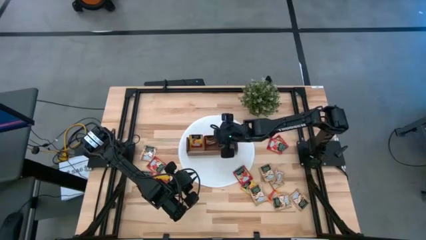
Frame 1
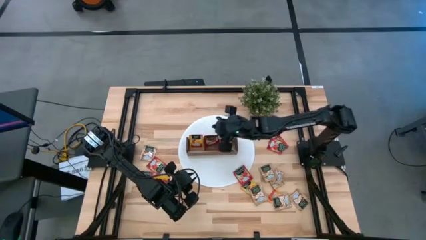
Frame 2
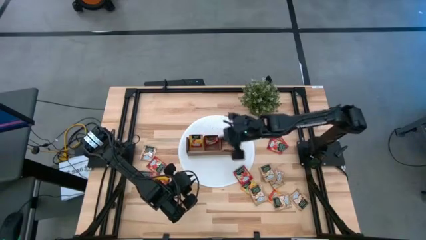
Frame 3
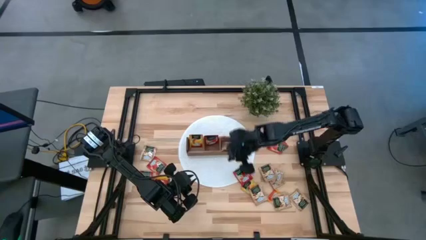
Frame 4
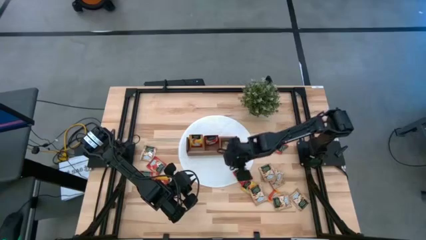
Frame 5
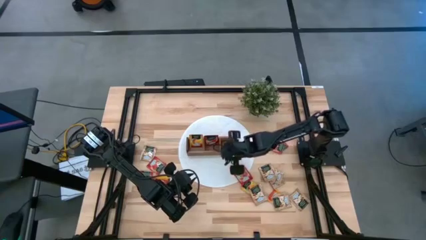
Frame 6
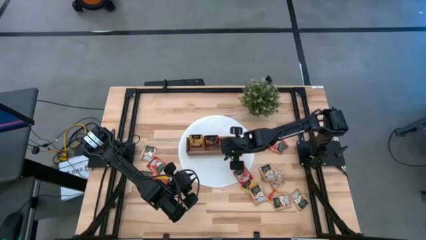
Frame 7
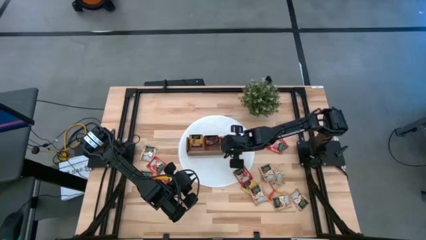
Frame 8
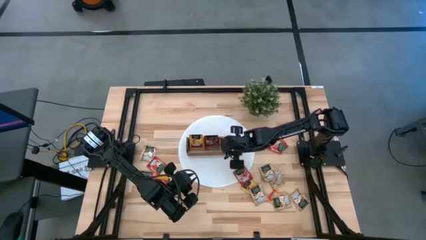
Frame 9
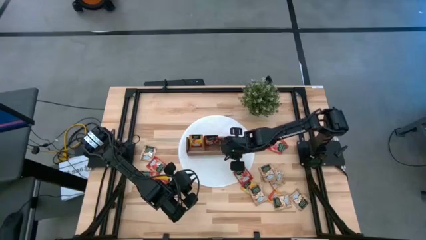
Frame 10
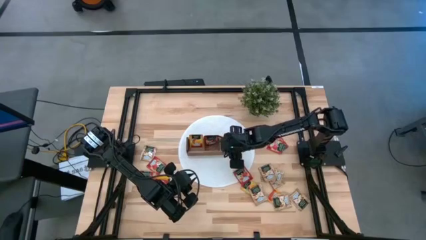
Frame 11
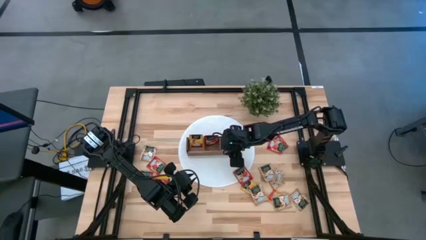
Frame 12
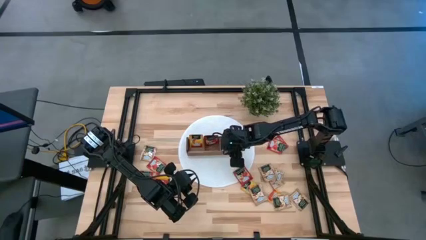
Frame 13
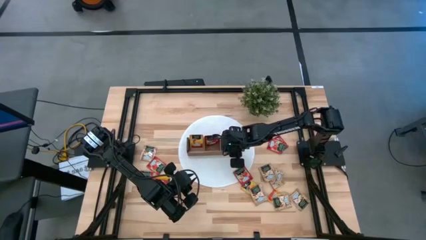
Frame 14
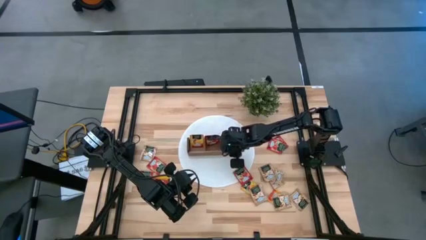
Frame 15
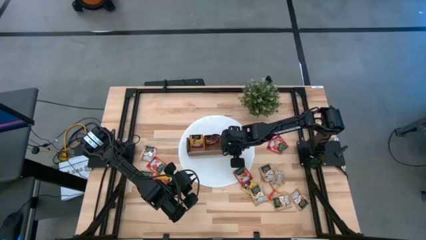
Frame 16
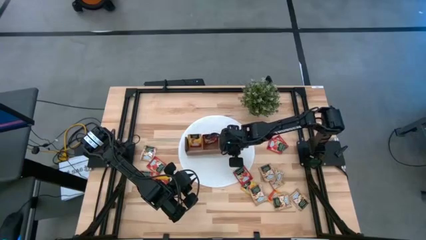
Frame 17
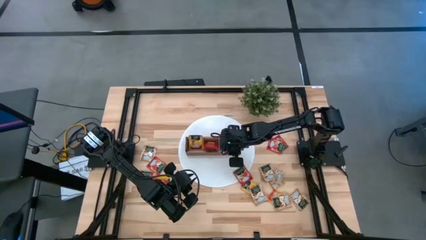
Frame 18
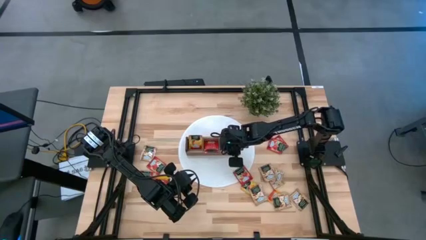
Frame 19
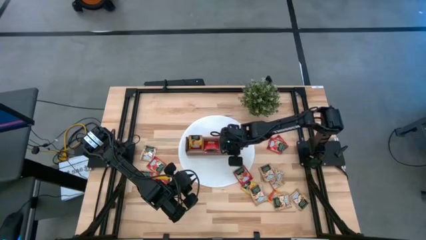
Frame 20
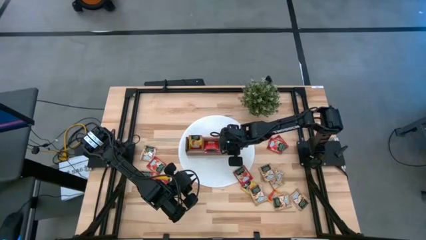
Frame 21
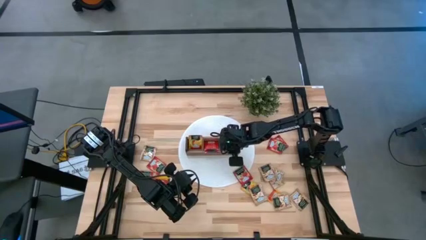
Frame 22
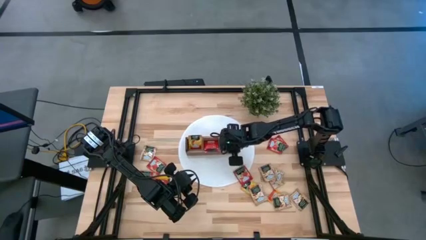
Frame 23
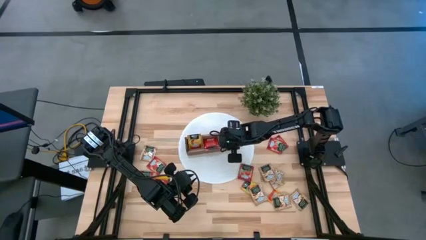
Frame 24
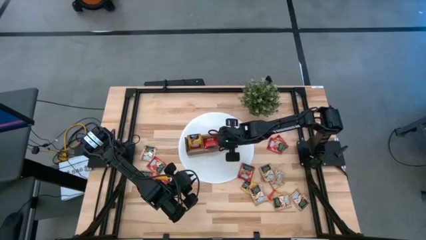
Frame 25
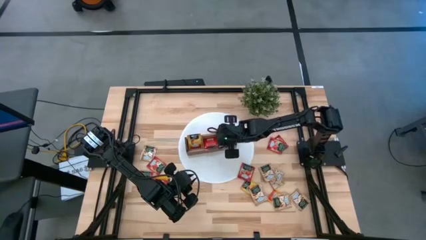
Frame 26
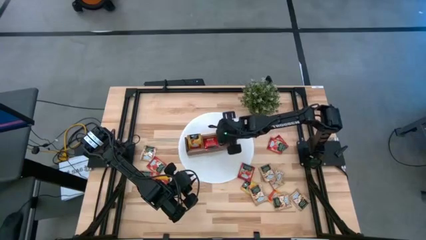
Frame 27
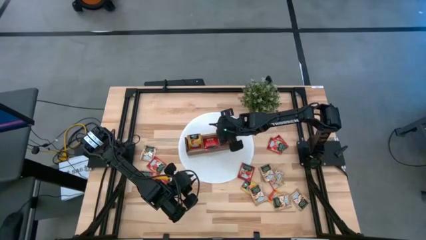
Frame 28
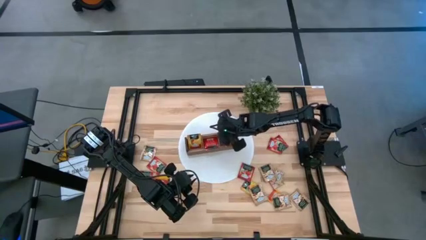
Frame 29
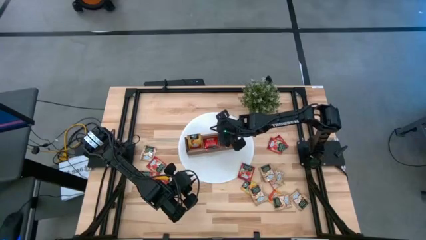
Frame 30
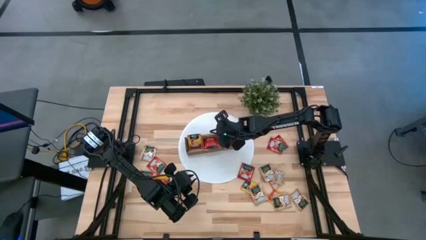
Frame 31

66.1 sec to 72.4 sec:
Task: Pick & Place Tea
Adjust the brown tea bag in the right section of the wooden organizer

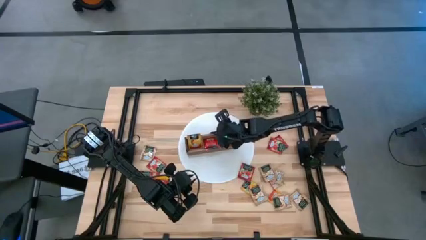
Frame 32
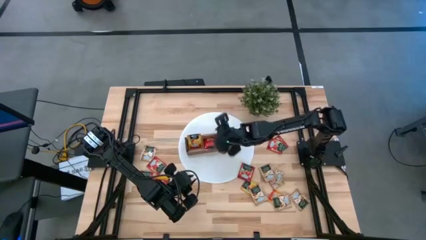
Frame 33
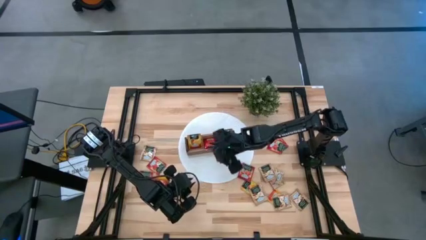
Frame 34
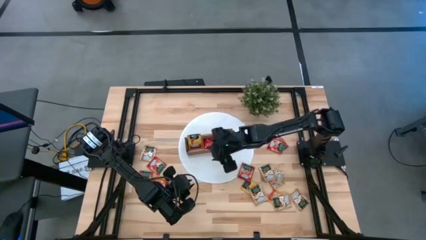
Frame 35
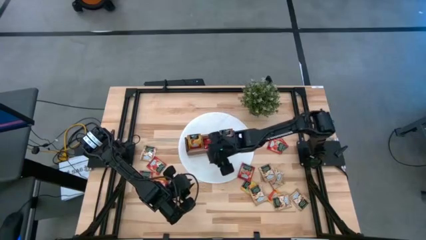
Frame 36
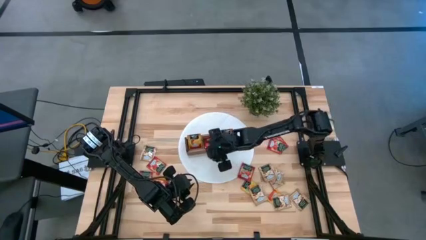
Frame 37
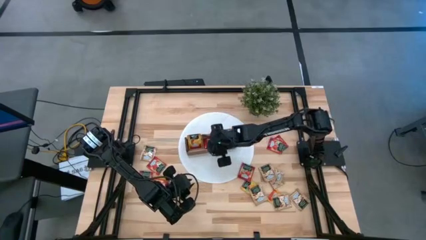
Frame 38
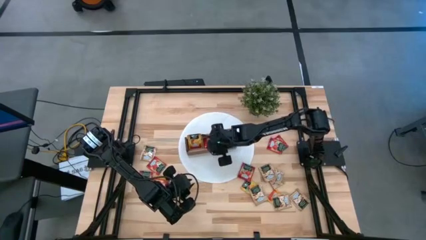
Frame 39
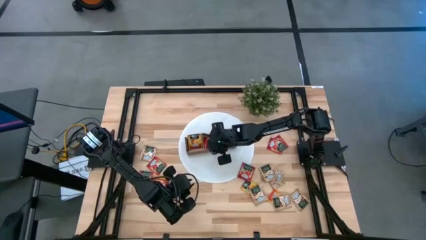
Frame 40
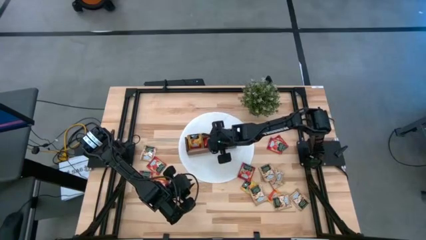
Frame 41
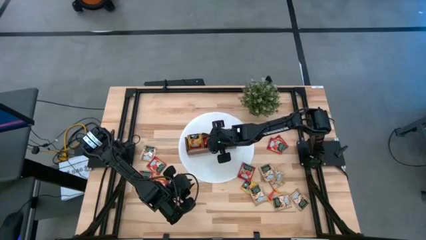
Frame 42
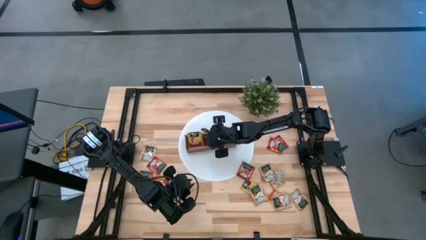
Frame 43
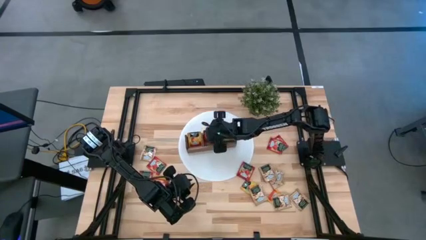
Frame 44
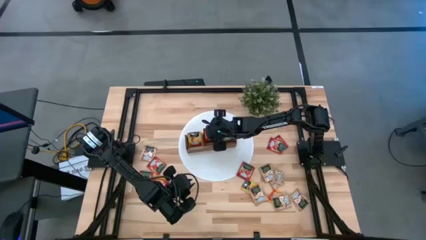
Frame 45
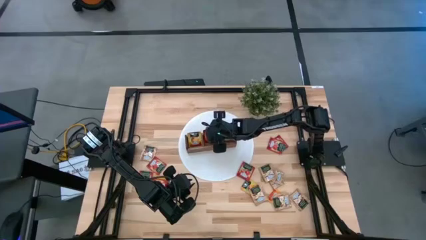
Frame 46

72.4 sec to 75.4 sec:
Adjust the red tea bags in the middle section of the wooden organizer

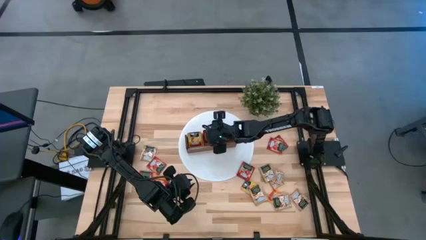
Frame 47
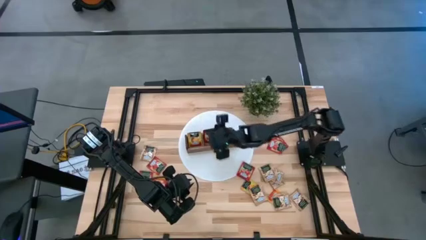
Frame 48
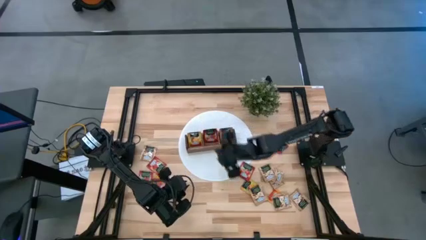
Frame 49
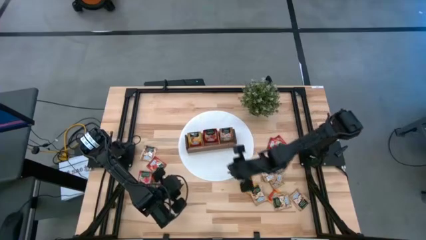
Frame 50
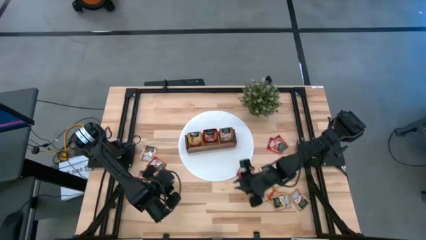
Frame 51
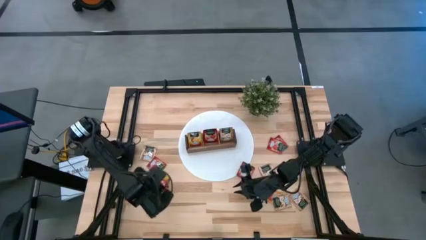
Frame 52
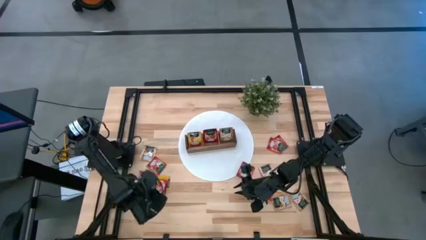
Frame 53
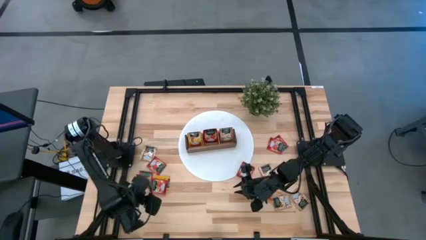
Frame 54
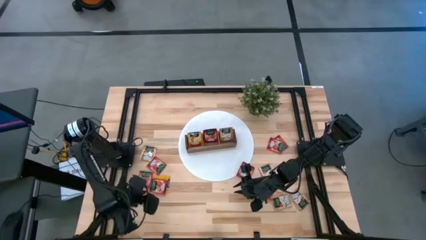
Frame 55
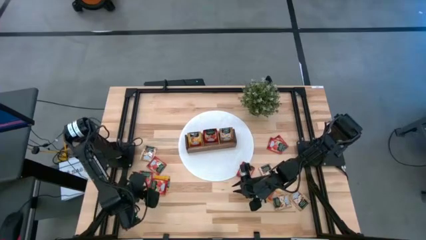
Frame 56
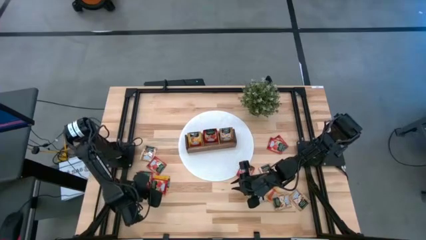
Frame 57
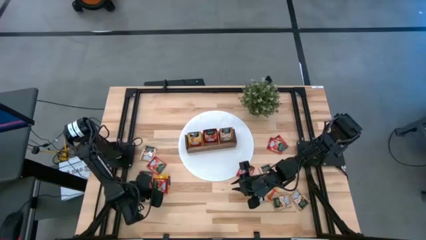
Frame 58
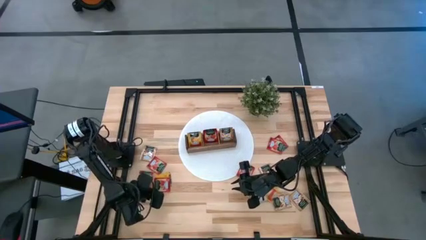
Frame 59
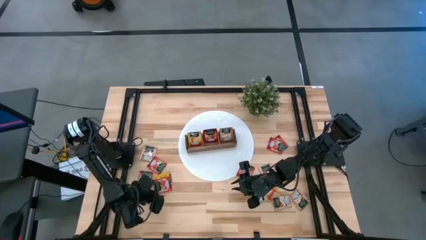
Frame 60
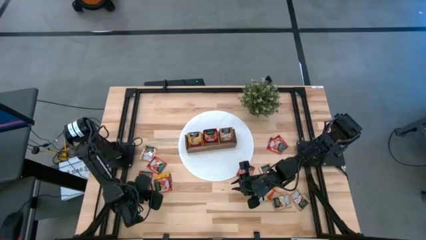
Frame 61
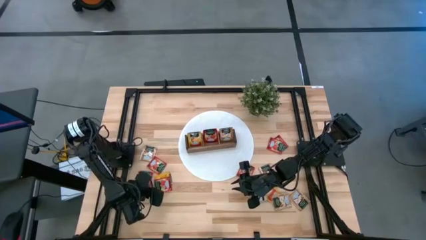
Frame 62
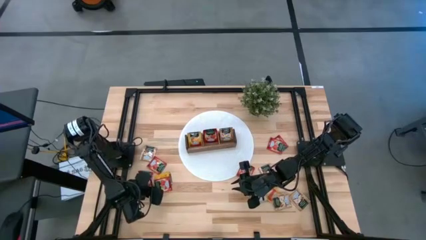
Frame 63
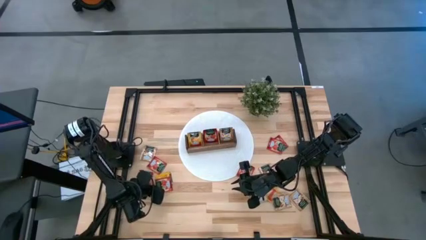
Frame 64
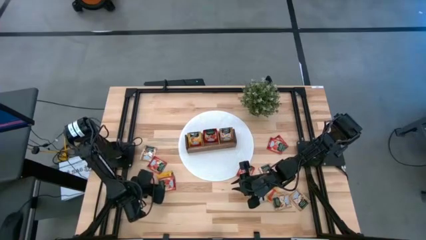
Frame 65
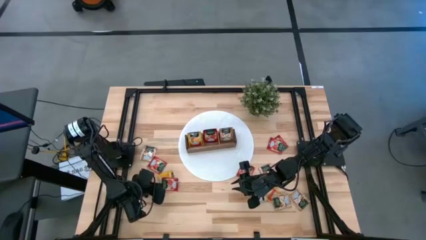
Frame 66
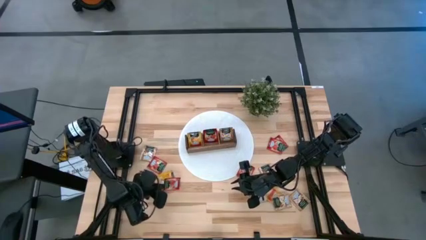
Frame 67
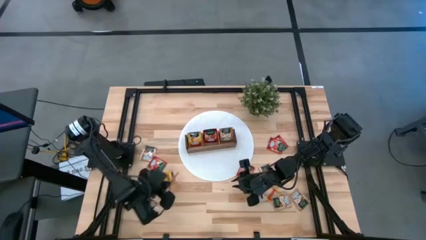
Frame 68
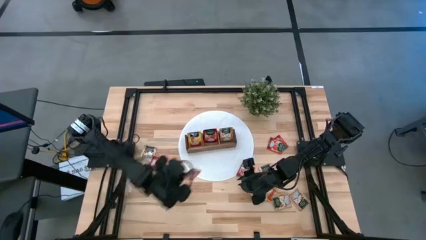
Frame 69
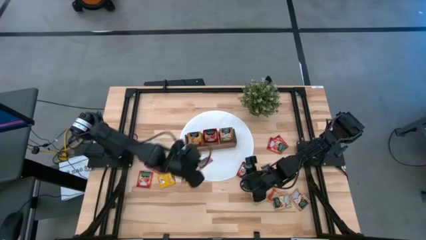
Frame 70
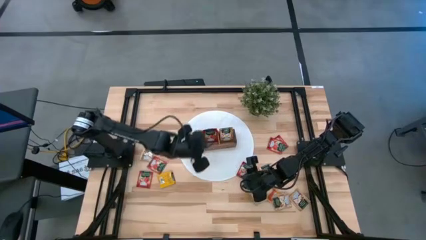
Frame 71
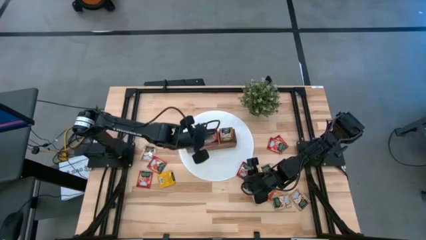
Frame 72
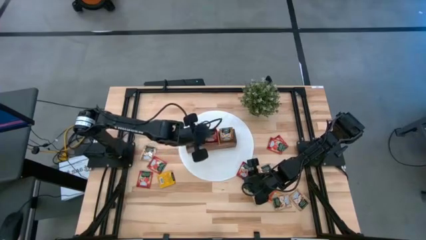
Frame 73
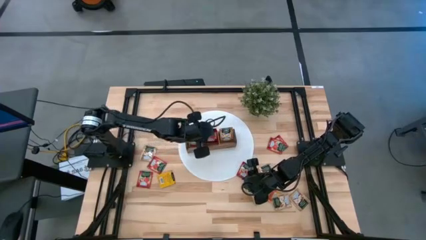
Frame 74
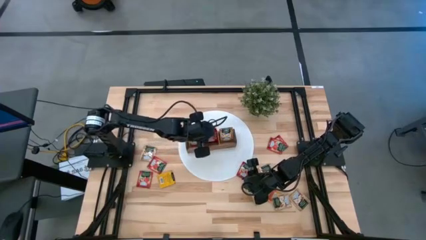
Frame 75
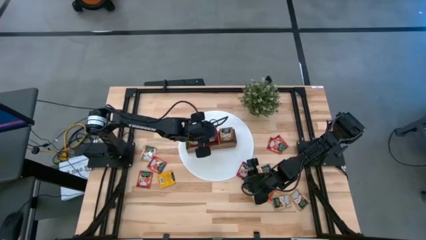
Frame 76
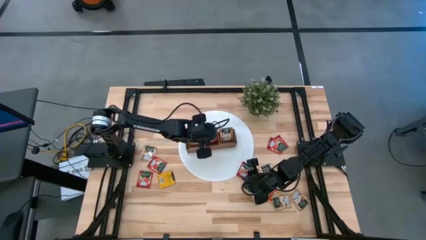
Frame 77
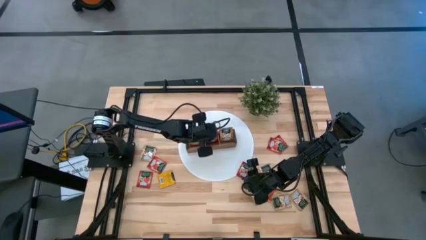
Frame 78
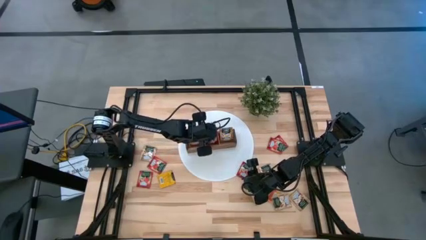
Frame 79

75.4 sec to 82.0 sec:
Put the red tea bag into the middle section of the wooden organizer

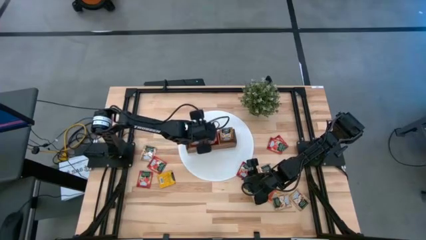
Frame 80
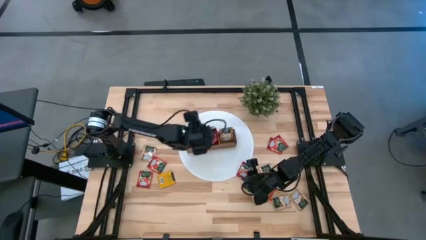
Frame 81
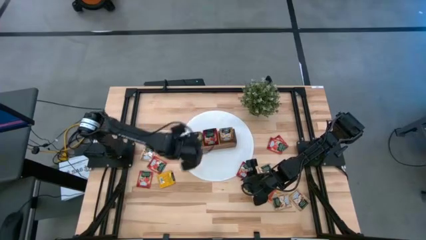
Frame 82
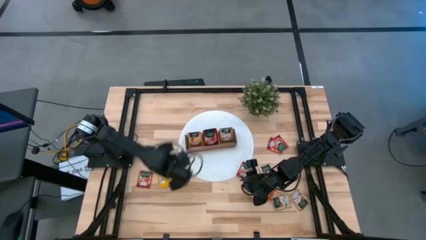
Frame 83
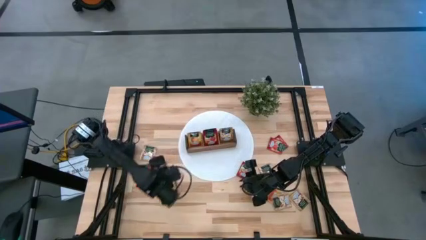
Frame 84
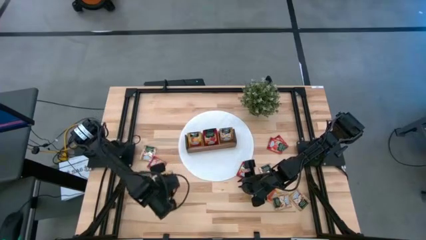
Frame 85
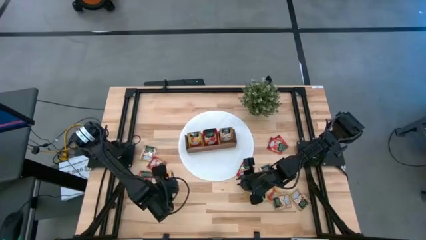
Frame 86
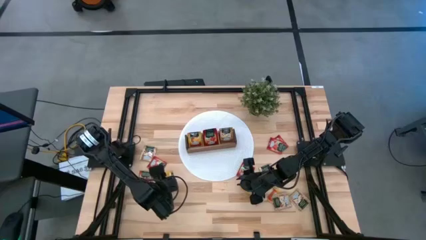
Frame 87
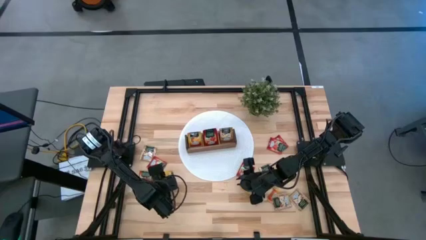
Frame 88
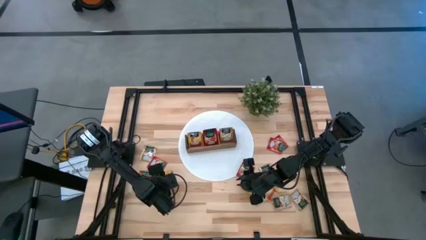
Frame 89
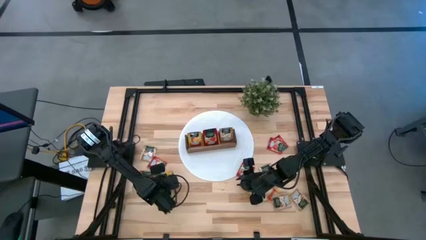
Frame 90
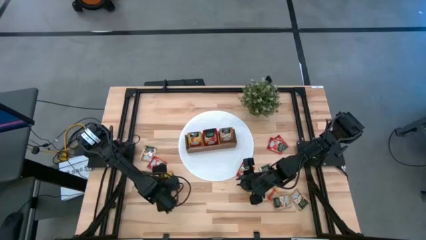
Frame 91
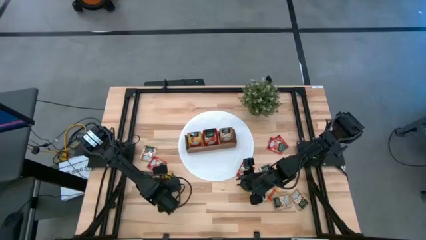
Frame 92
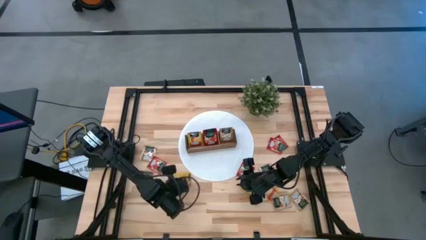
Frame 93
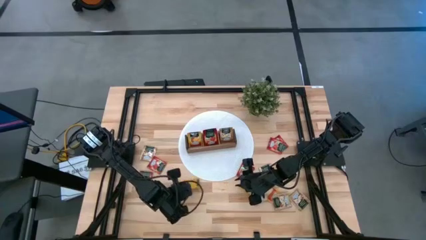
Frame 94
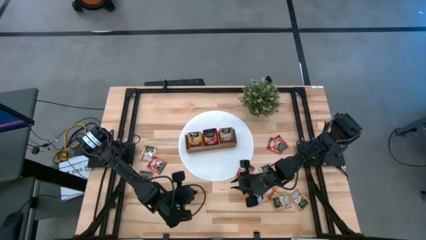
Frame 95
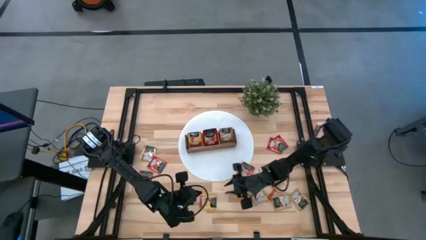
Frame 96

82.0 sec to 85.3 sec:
Put the orange tea bag into the left section of the wooden organizer
